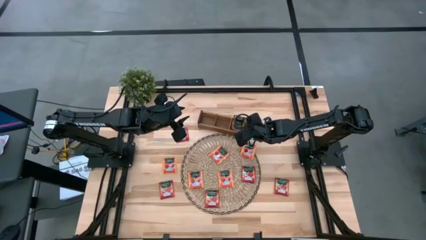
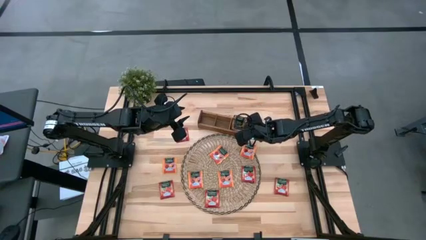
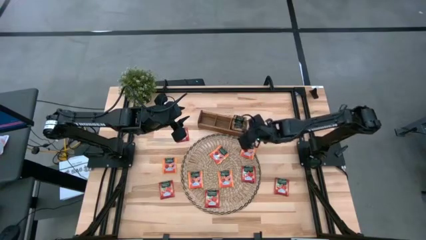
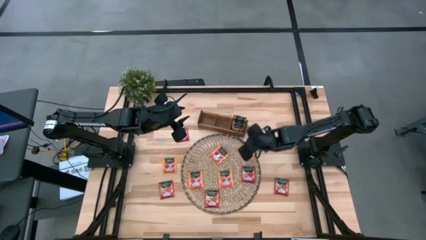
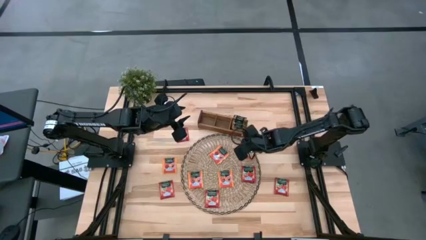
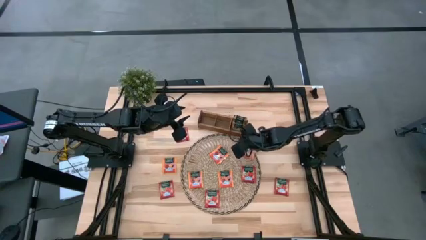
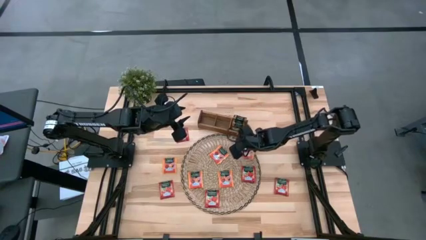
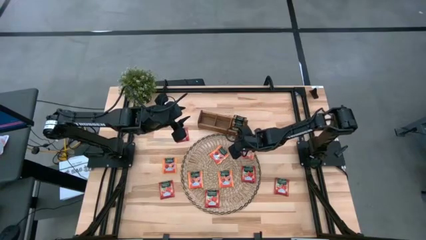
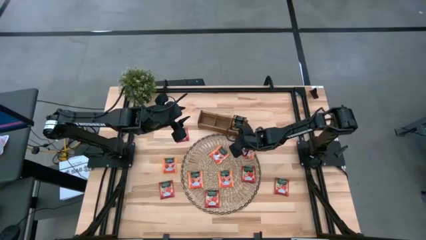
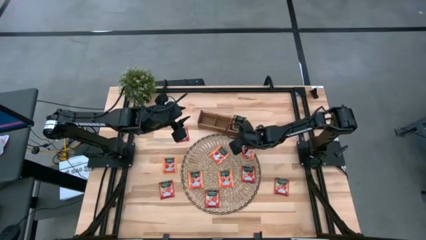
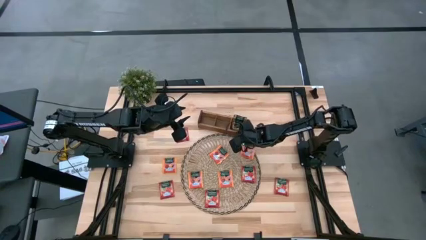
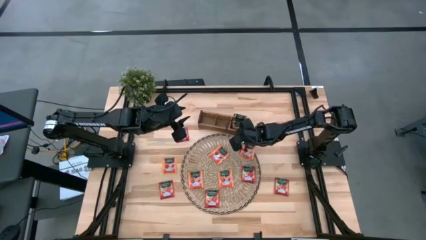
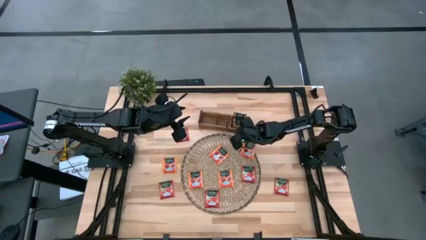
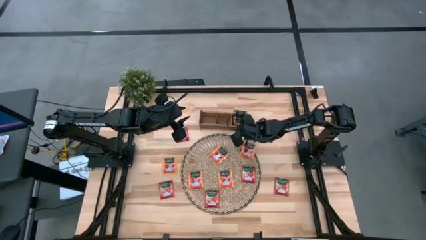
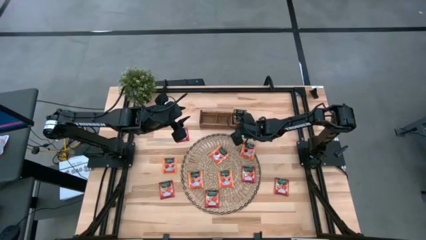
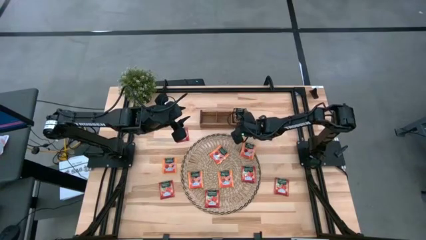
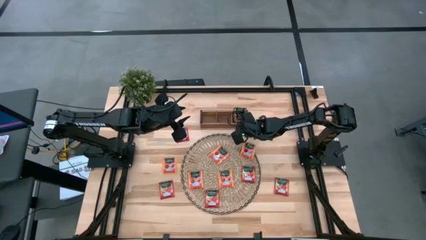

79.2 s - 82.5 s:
Task: Pick & Place Tea
Adjust the wooden organizer

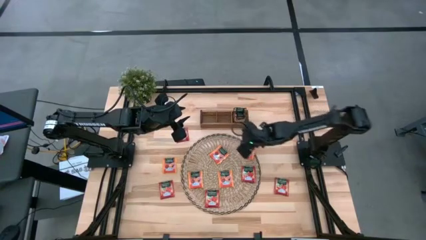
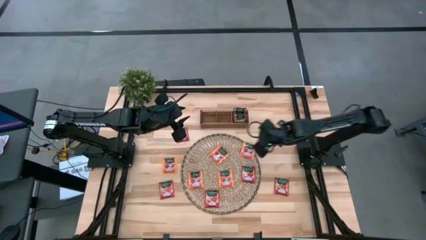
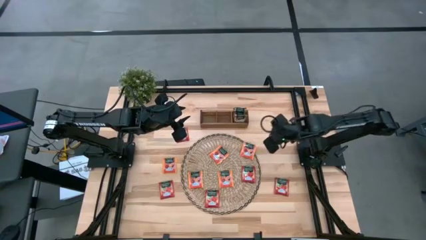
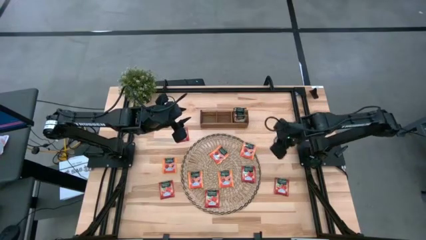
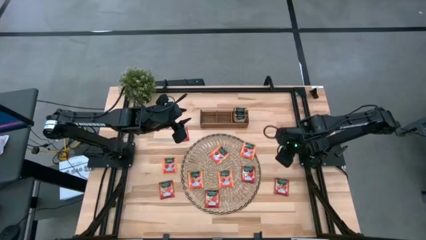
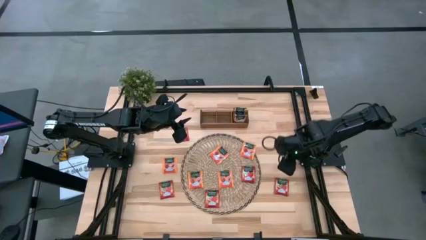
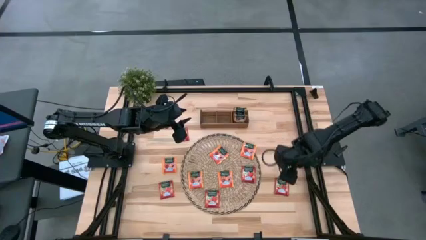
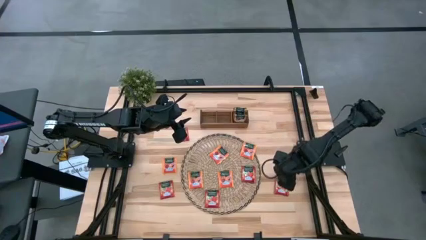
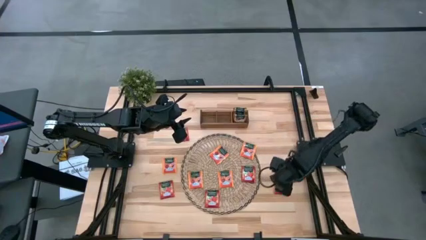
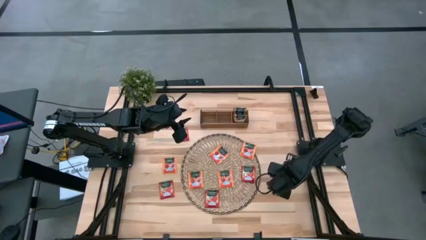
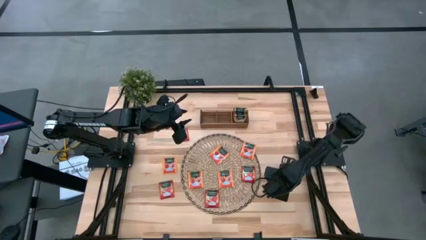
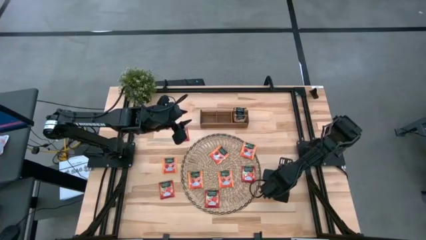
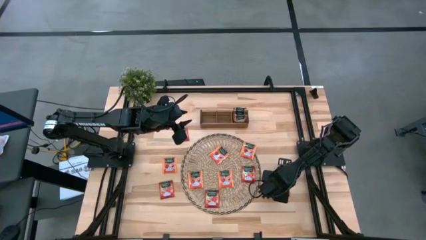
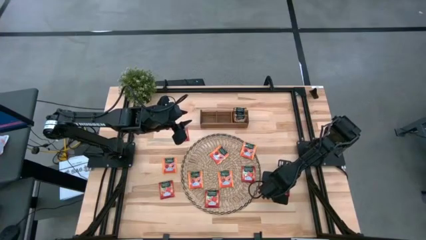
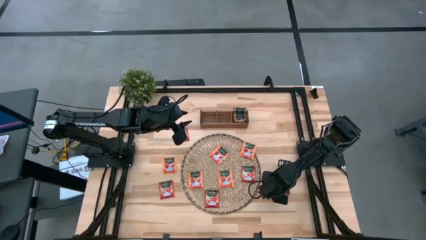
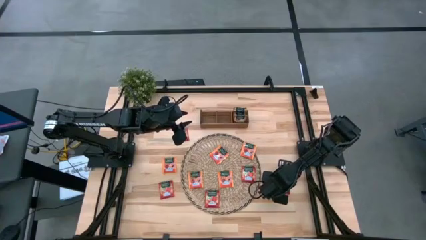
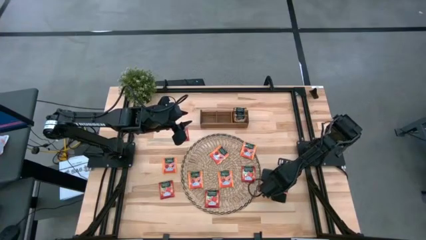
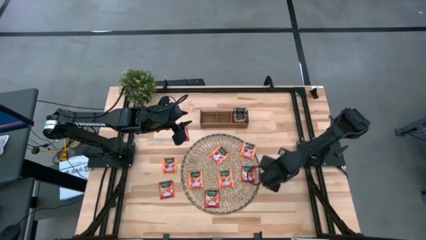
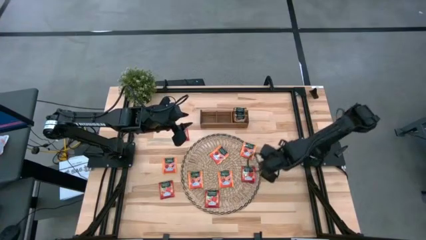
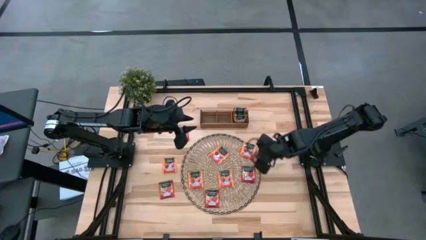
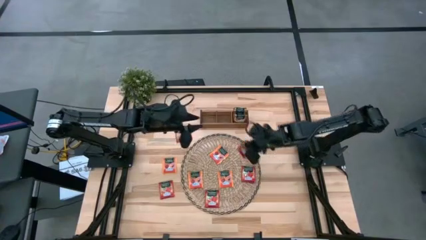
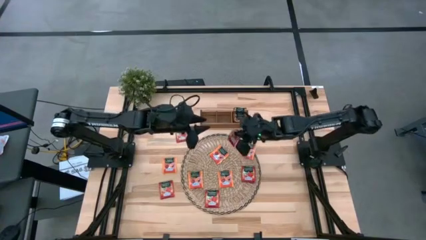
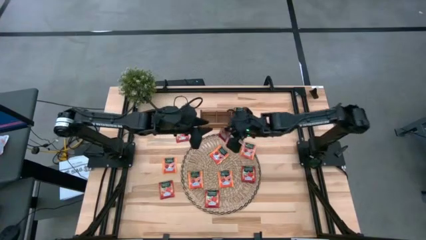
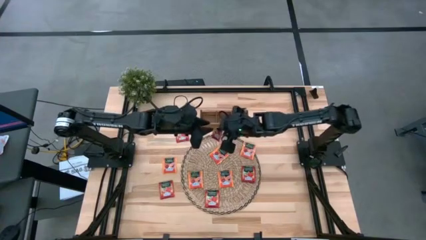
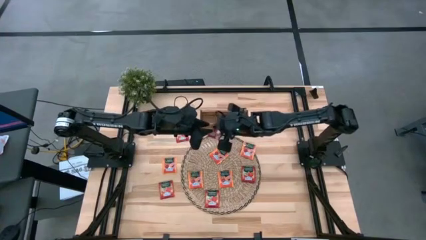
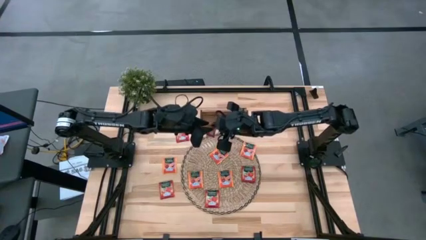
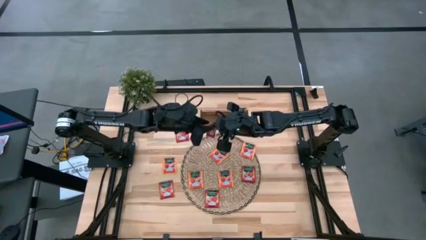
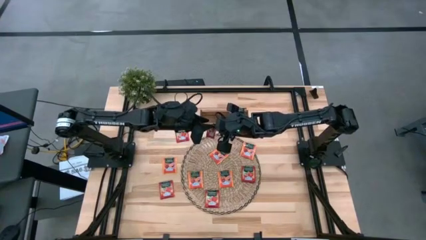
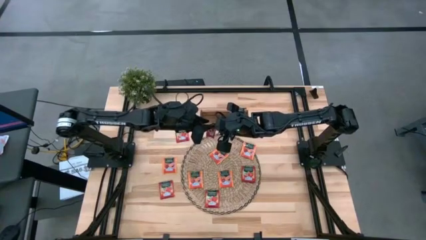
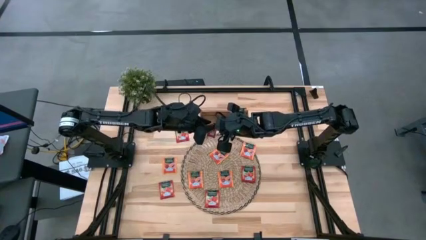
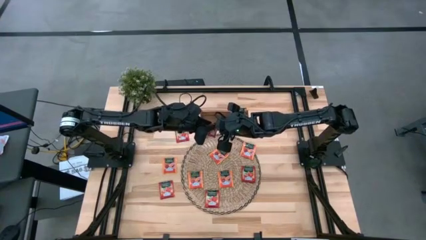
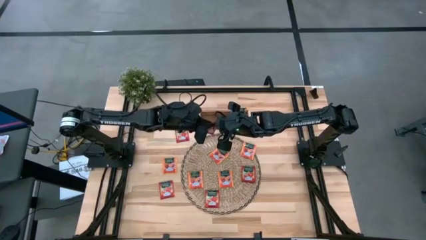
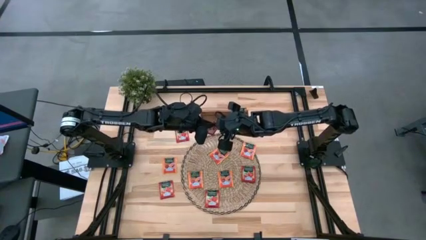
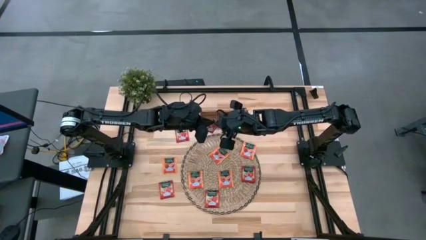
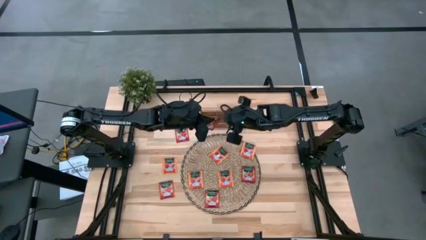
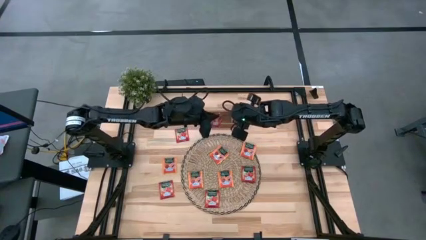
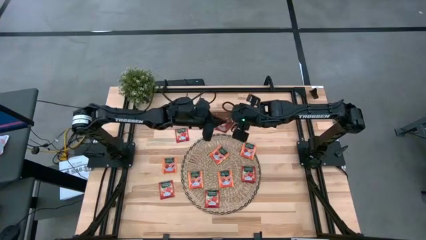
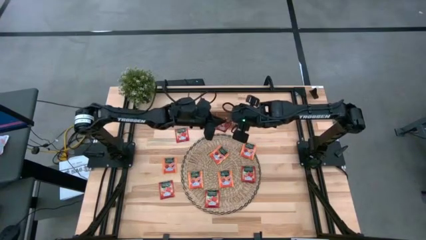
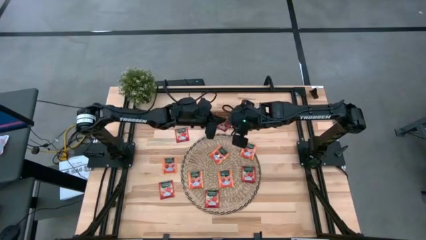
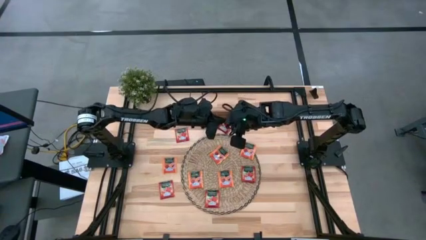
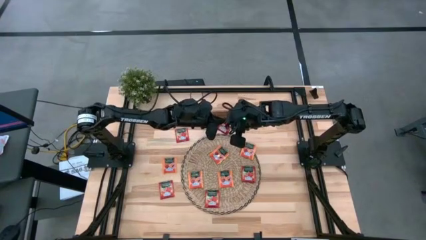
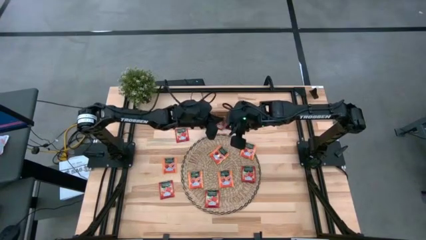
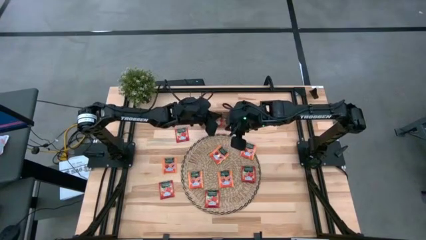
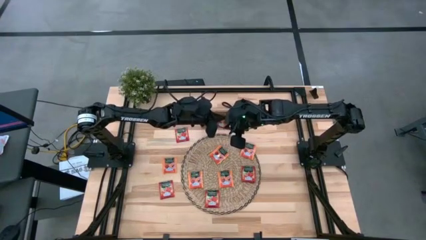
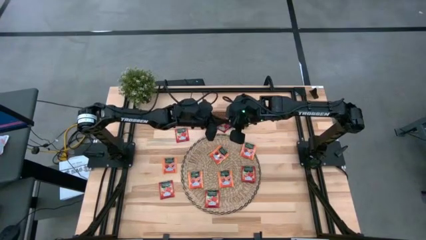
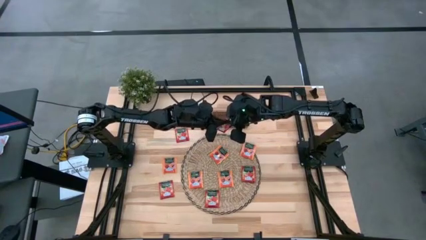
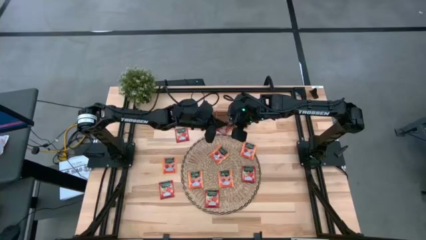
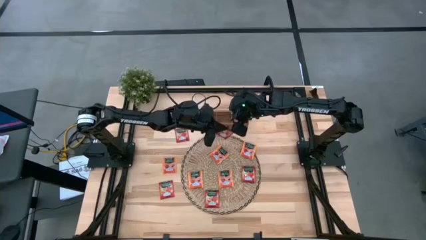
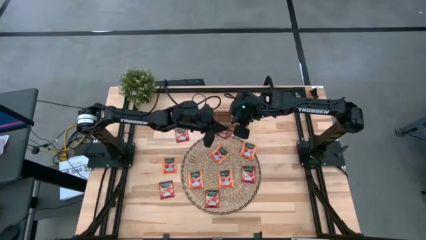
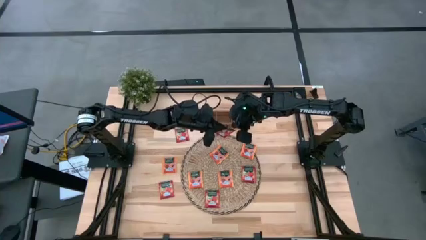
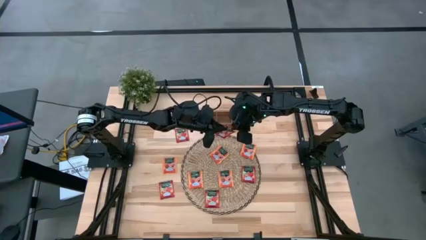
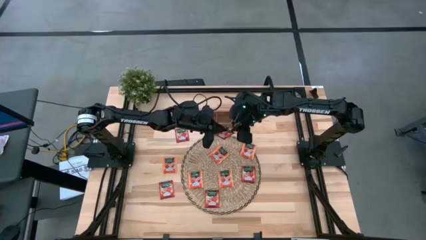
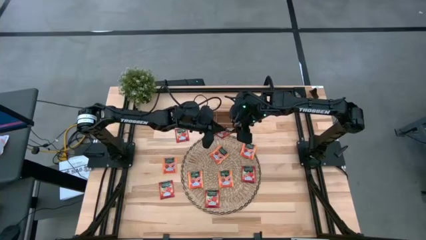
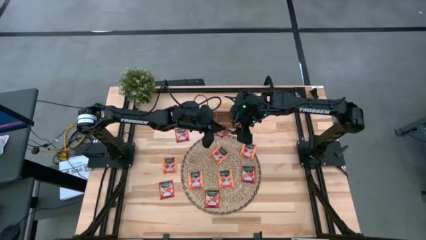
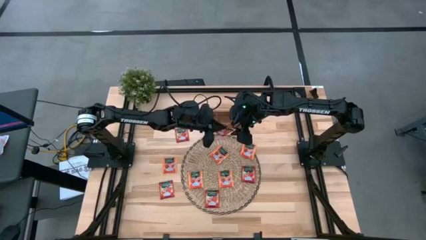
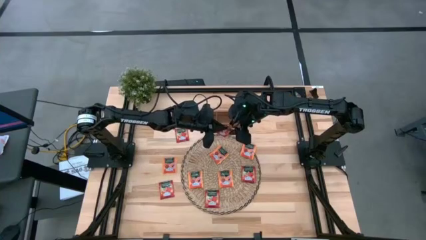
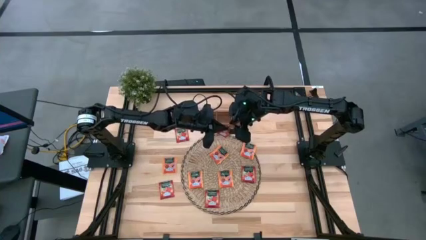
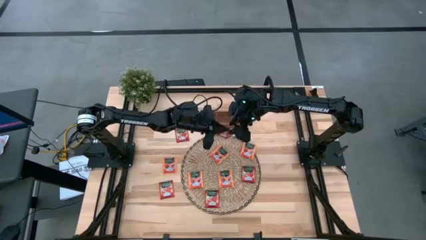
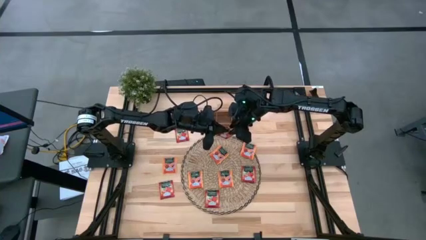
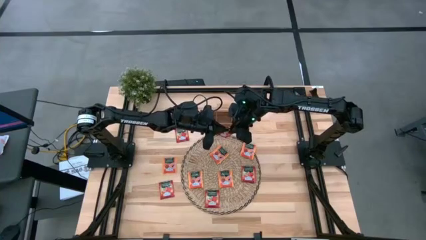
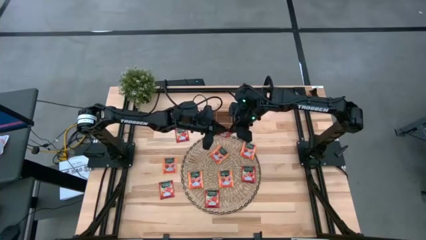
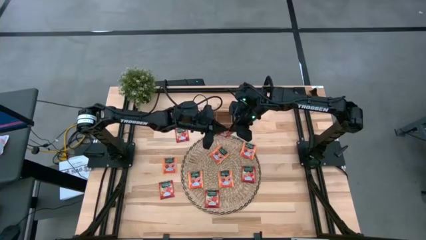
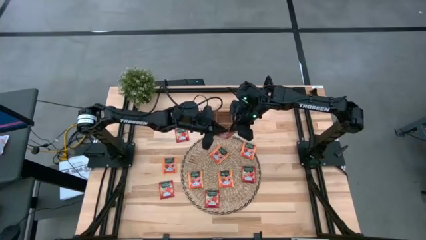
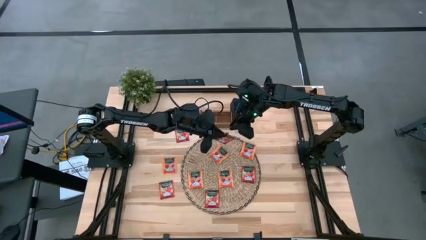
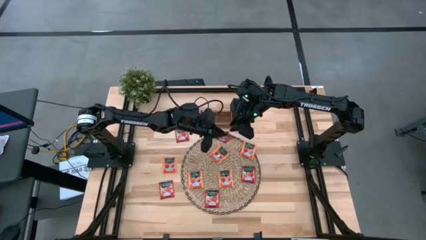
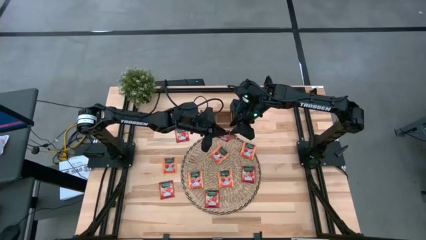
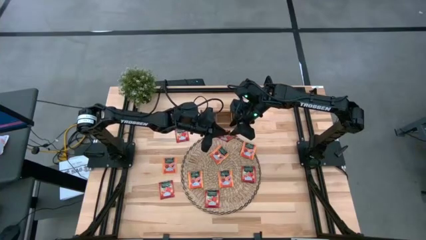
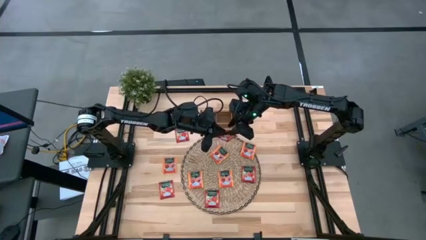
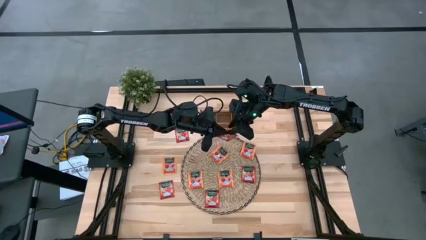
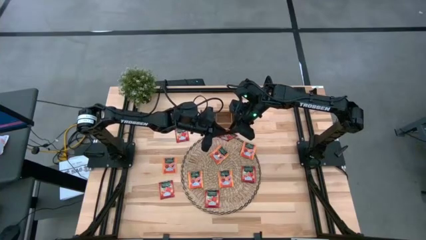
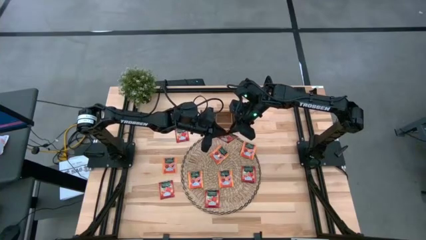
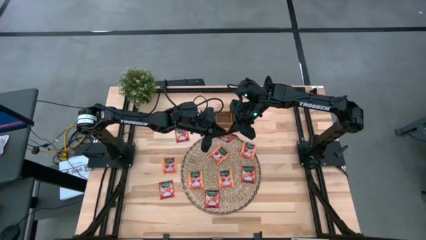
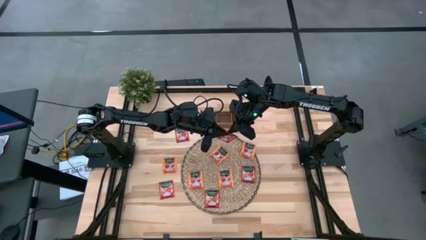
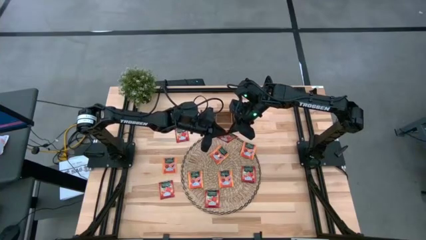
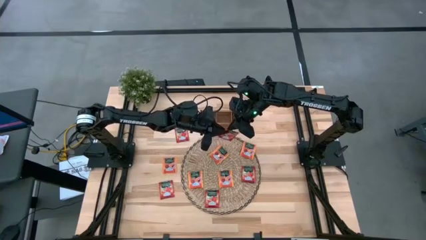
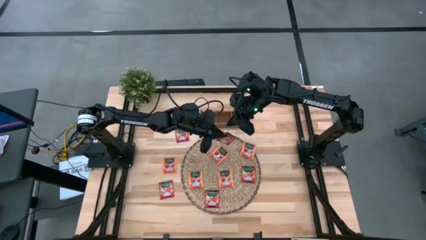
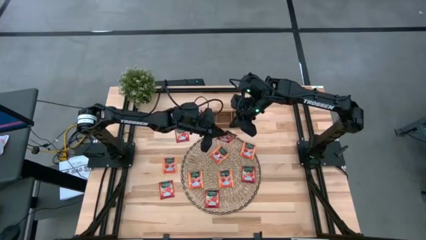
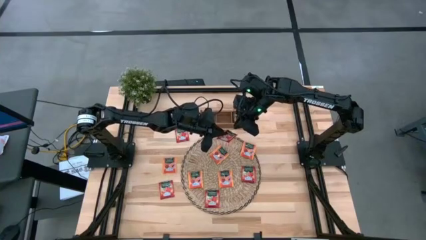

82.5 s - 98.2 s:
Put the red tea bag into the middle section of the wooden organizer
